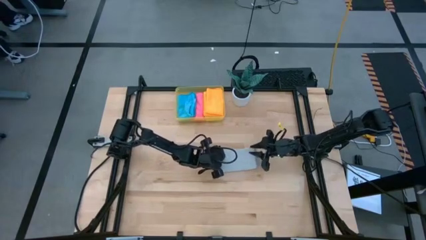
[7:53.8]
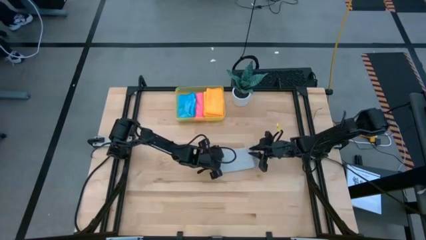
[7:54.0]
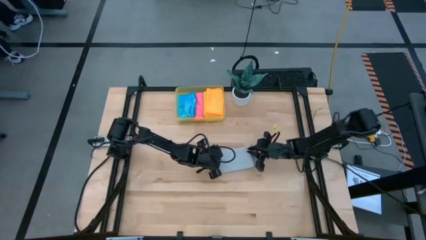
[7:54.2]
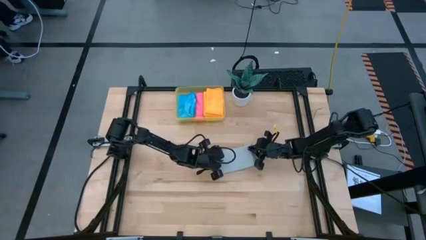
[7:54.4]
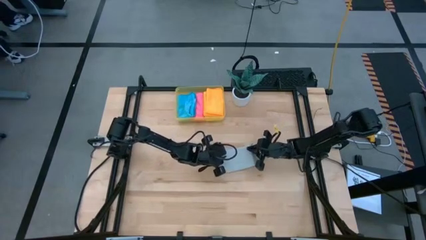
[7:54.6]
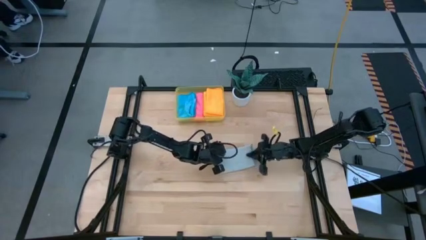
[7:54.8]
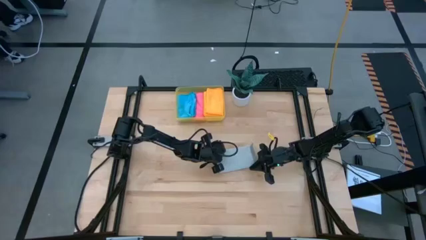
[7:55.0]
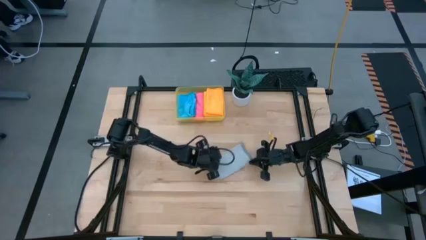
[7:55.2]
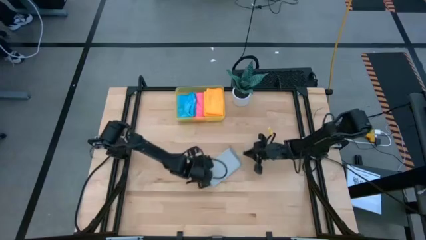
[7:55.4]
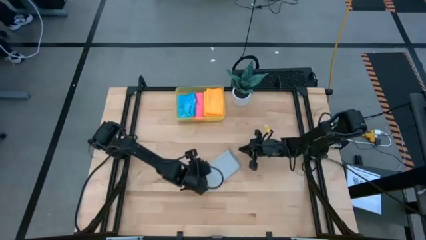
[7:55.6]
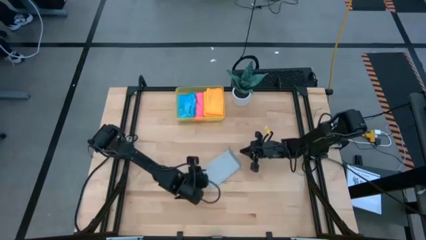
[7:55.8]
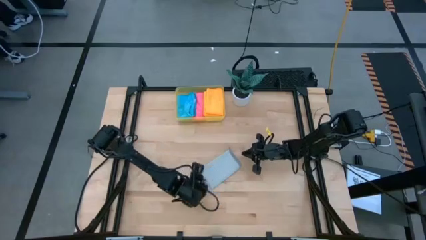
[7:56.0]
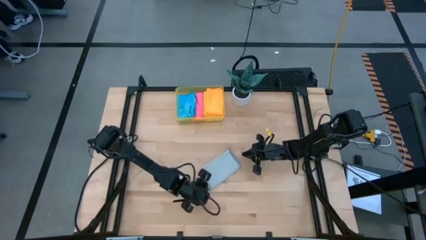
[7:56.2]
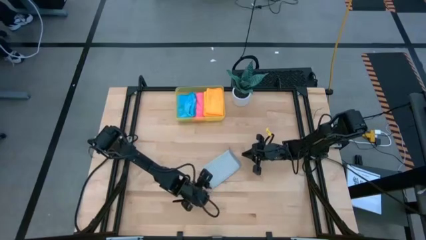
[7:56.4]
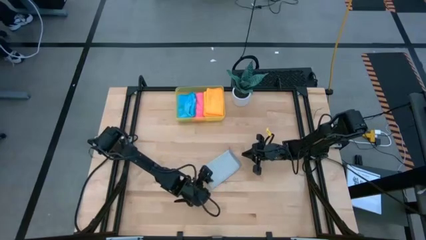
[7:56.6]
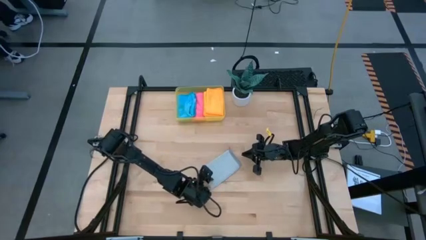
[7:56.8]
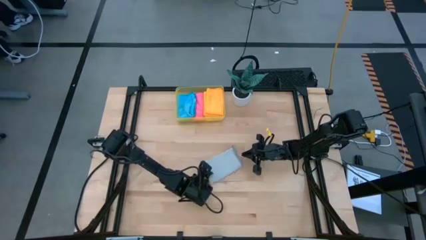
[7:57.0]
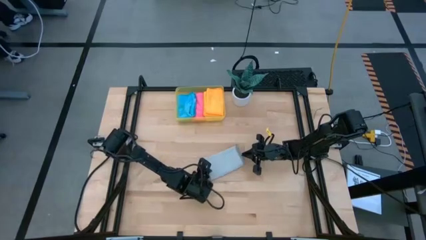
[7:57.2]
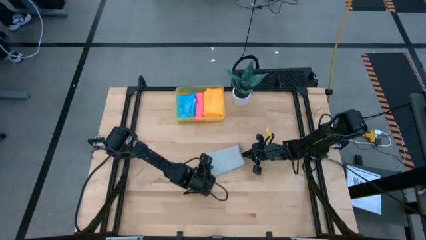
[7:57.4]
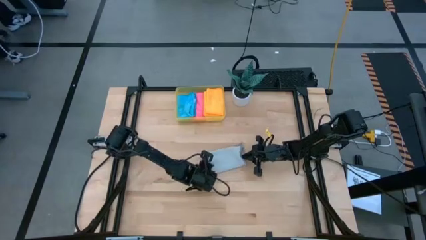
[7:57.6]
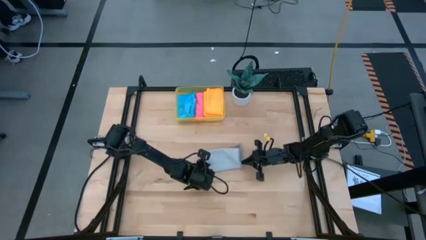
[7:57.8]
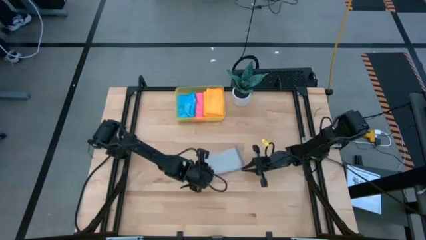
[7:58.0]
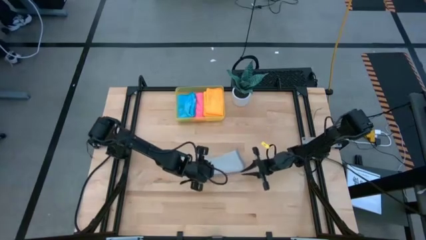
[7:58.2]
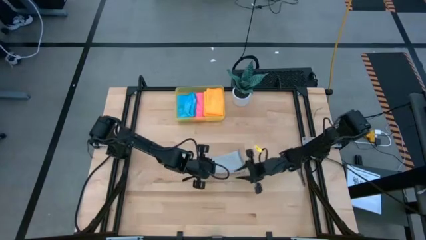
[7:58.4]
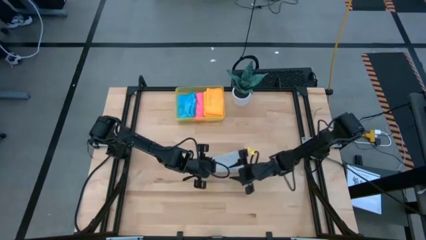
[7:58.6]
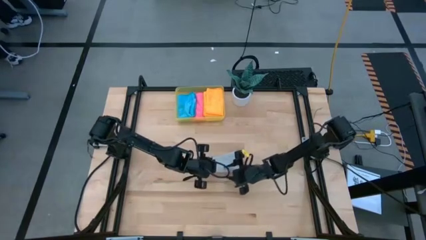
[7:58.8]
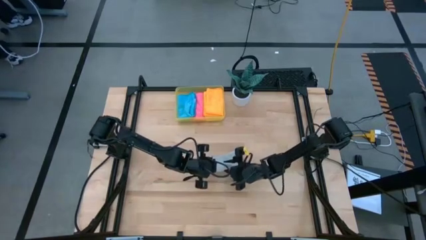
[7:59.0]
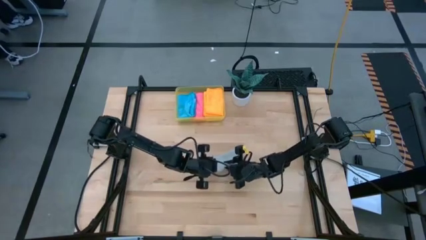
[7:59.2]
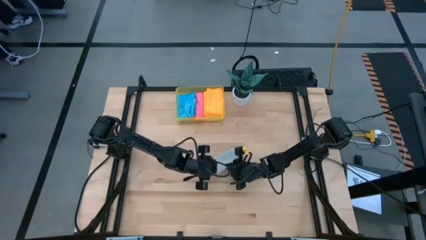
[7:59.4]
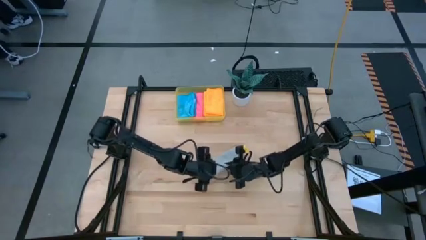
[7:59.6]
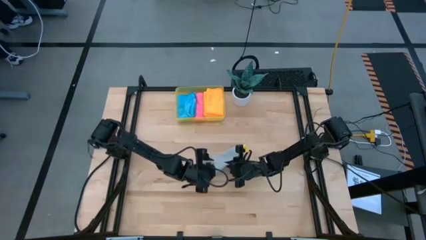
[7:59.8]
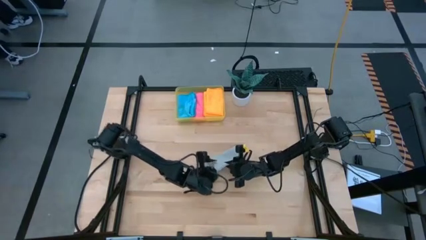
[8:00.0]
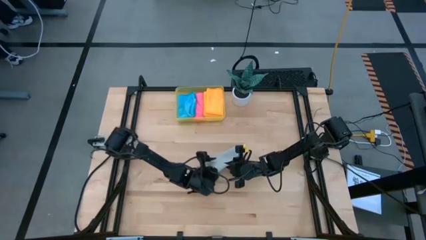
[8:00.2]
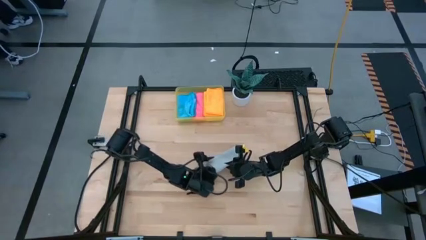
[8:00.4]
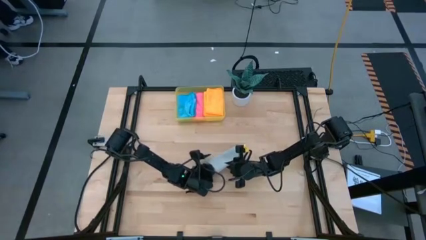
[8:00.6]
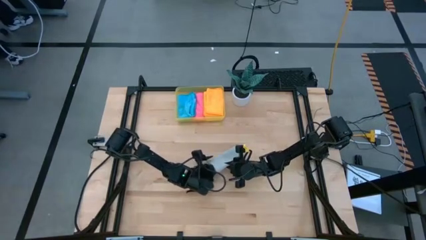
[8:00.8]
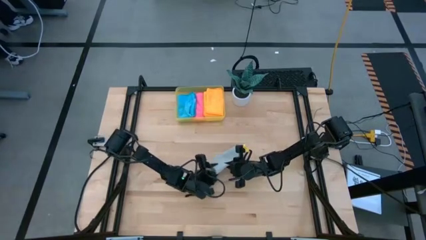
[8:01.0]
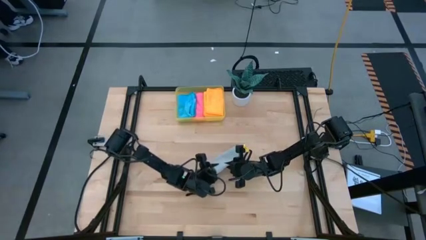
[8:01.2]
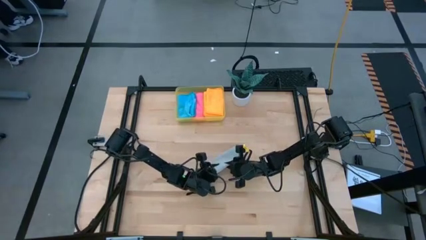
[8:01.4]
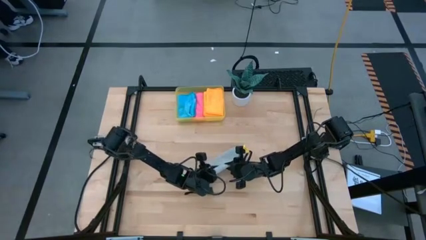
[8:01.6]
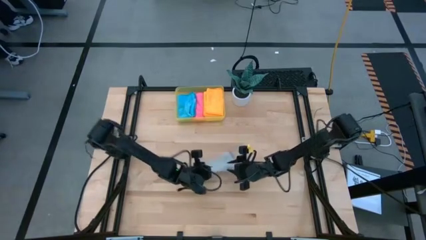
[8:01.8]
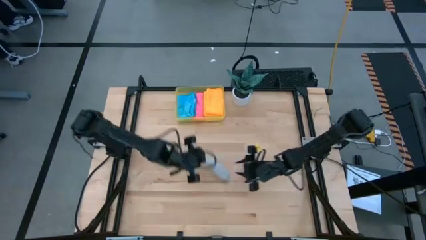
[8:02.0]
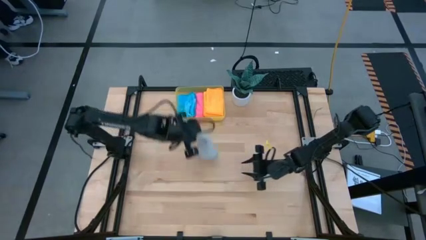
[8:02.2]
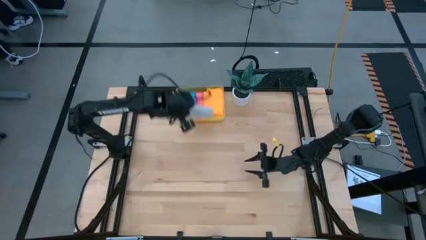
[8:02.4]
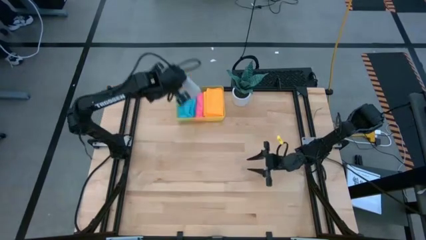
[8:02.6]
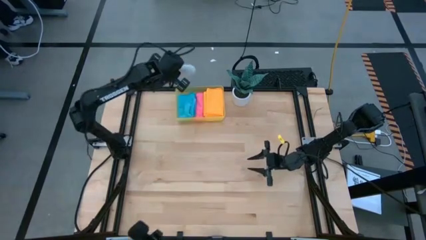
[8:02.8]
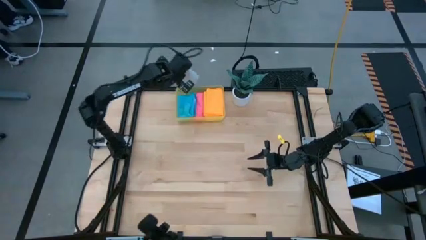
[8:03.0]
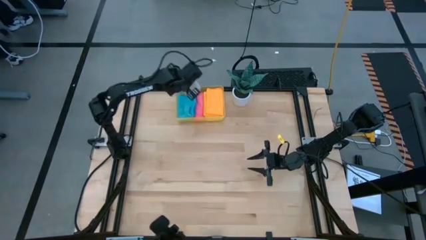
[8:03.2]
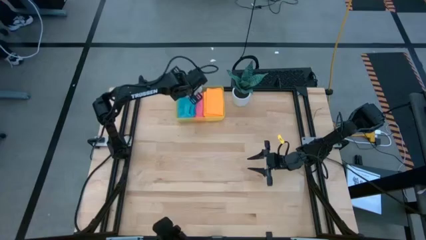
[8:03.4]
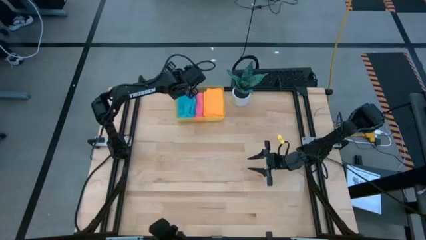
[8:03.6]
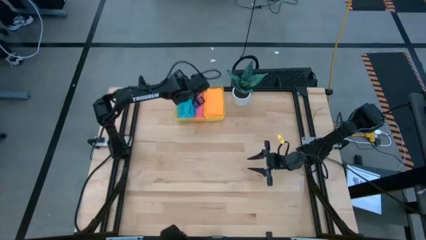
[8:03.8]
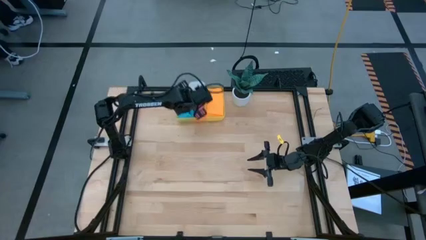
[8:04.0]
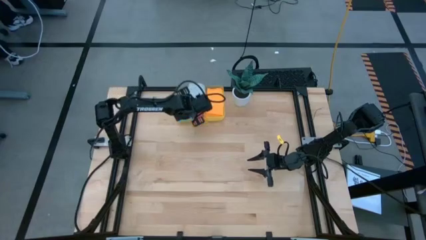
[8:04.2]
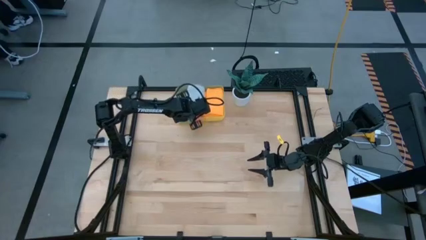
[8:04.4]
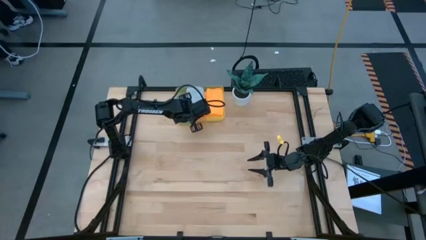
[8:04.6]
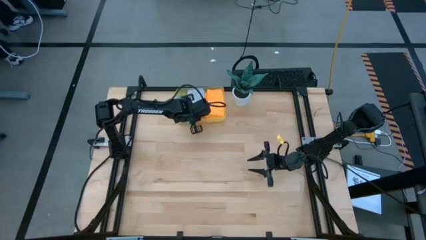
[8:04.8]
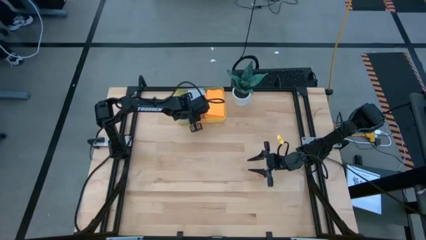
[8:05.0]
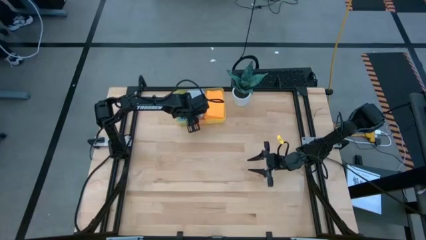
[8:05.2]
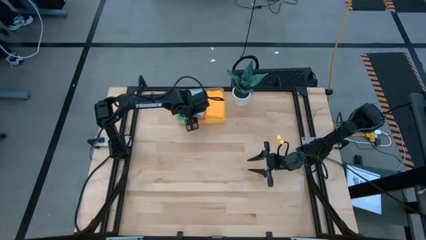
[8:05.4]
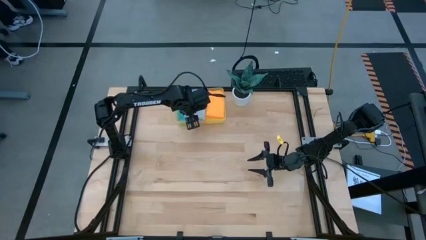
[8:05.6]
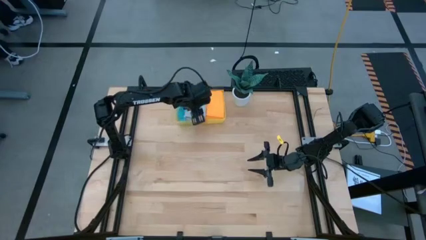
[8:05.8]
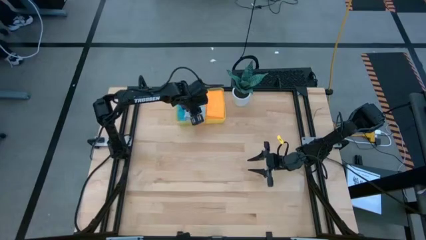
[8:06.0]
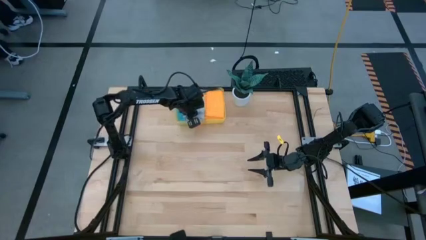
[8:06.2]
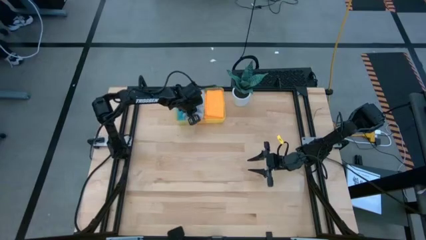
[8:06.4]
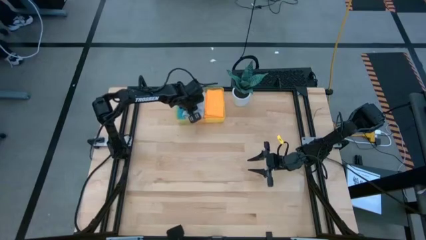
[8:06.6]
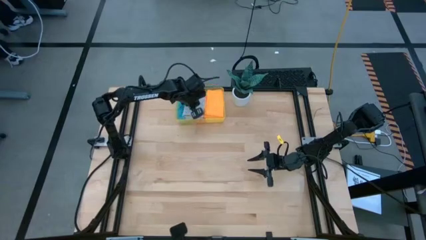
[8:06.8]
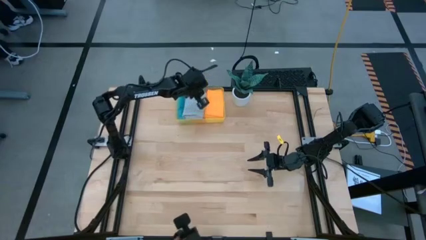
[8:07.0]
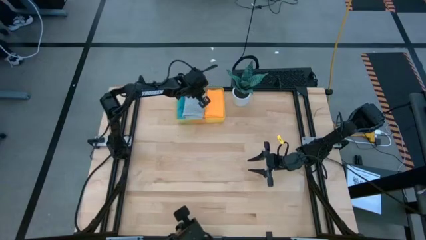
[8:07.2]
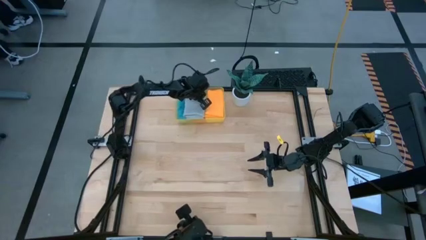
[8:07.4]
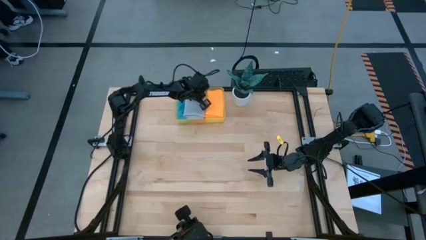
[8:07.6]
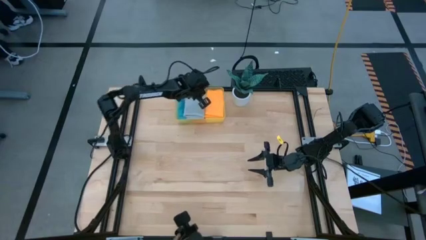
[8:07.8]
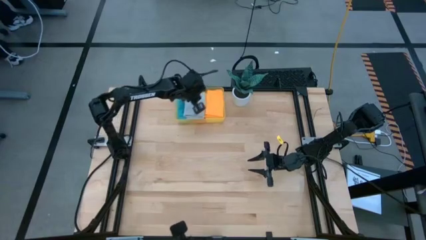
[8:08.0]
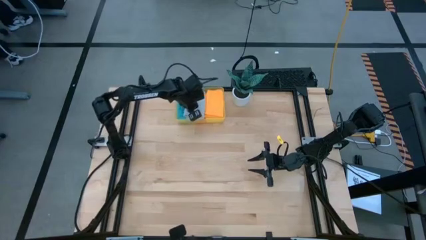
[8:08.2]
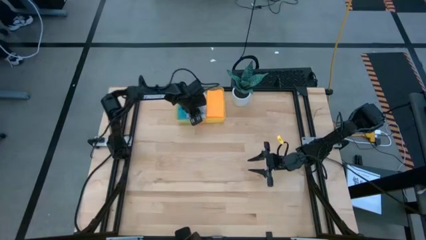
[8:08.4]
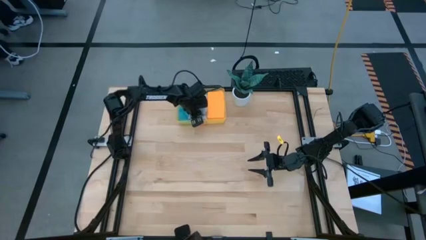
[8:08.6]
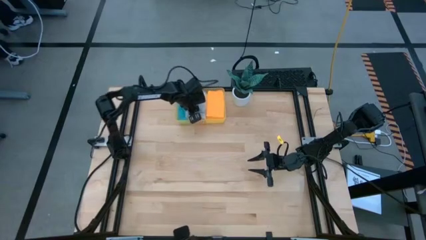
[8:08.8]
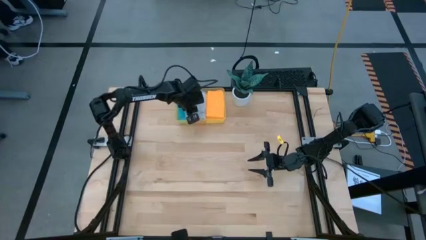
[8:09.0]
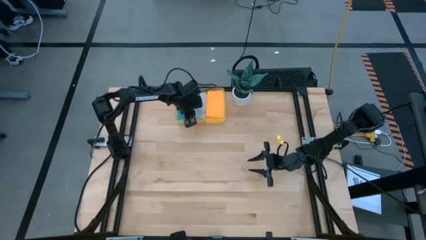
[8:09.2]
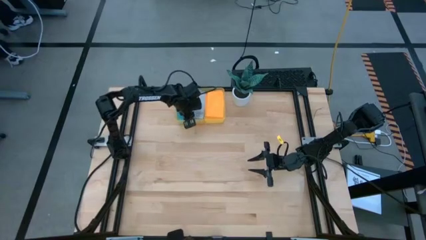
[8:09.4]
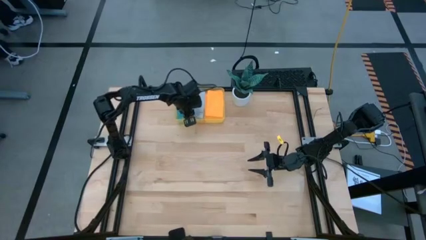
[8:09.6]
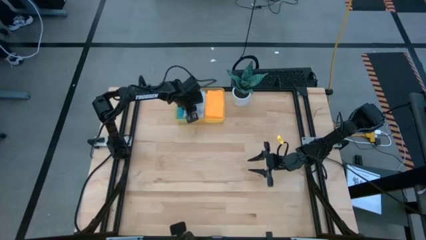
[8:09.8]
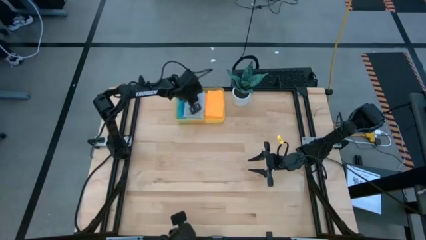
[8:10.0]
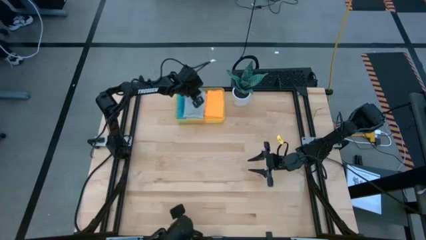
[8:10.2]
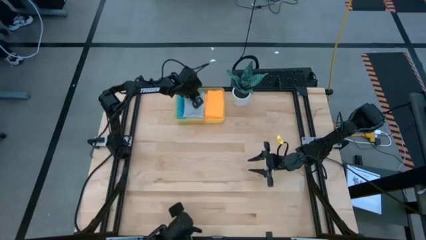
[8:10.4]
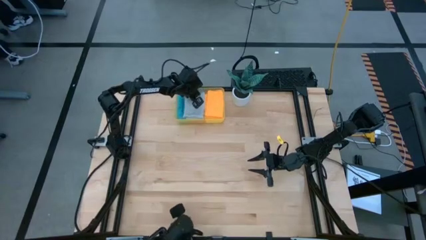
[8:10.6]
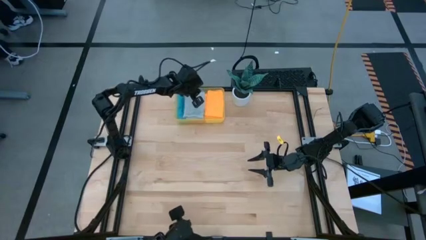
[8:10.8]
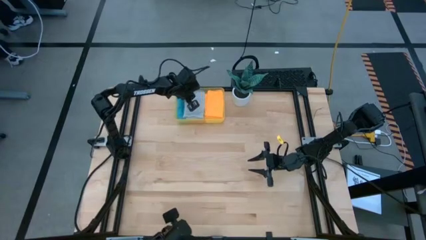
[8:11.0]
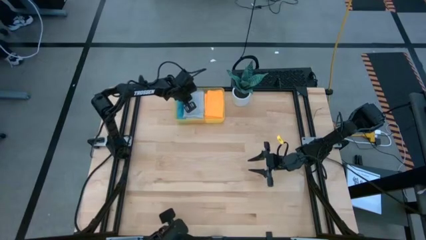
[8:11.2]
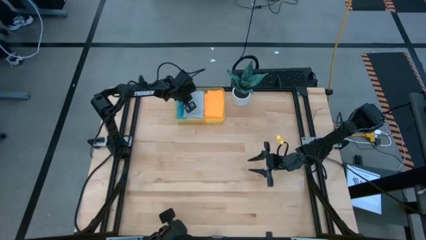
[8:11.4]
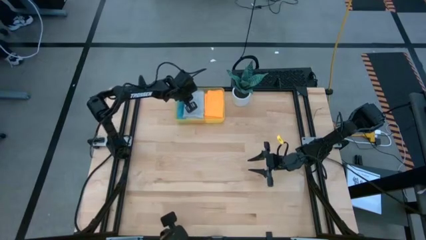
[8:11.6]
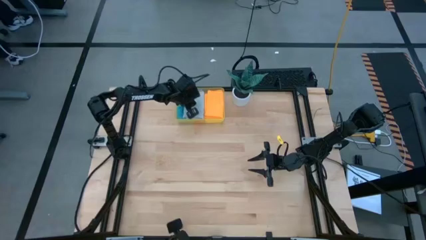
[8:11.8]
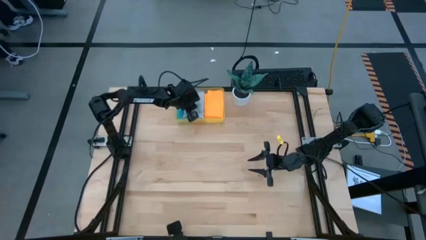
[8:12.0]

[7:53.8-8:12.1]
Task: Fold microfiber towels
Put the gray microfiber cloth into the yellow bin
